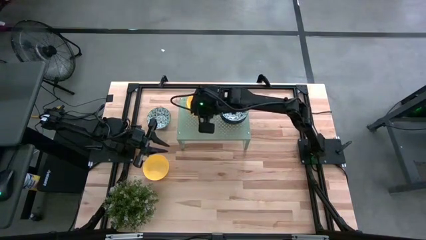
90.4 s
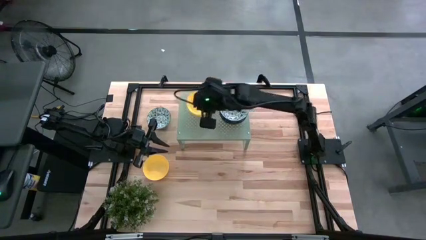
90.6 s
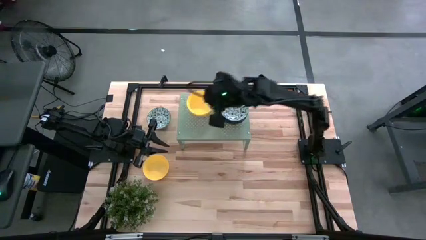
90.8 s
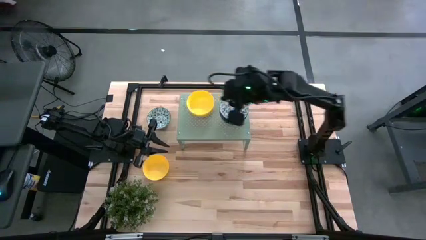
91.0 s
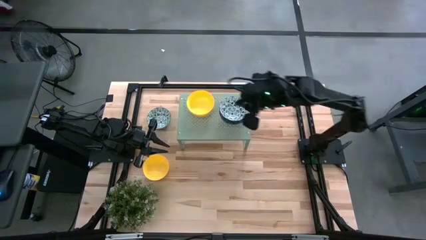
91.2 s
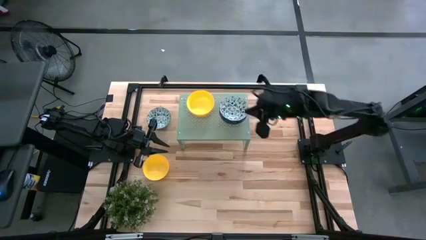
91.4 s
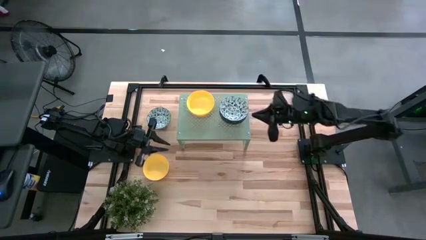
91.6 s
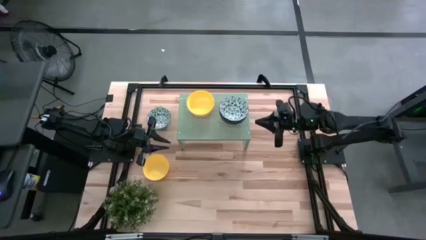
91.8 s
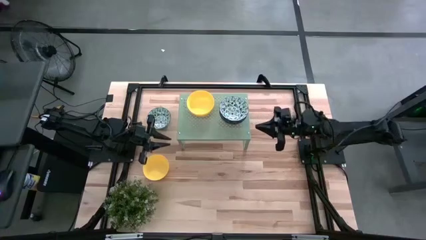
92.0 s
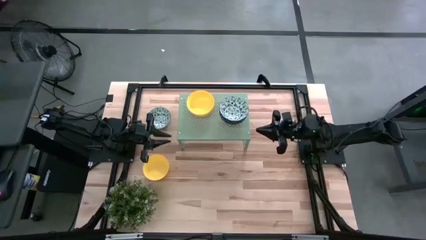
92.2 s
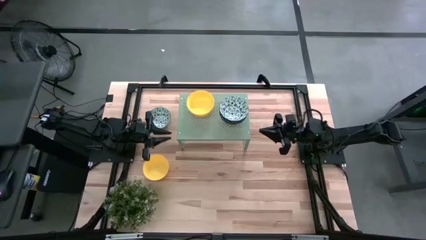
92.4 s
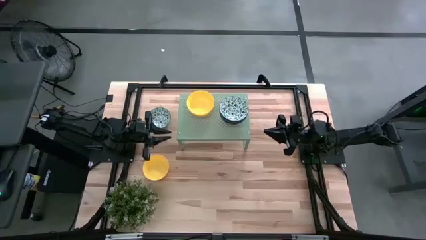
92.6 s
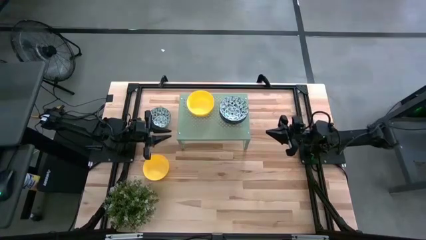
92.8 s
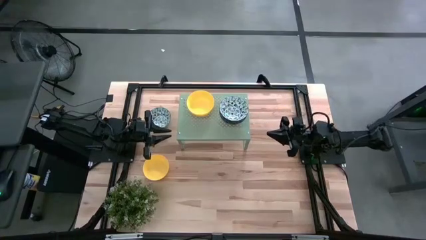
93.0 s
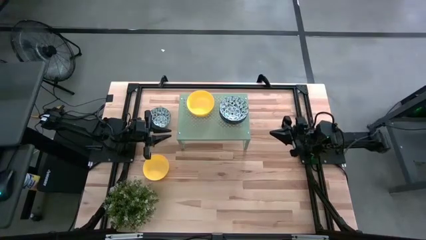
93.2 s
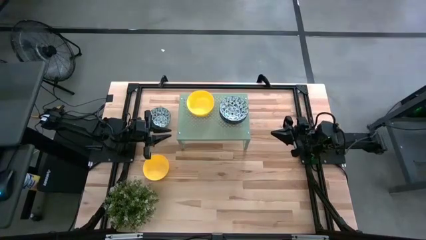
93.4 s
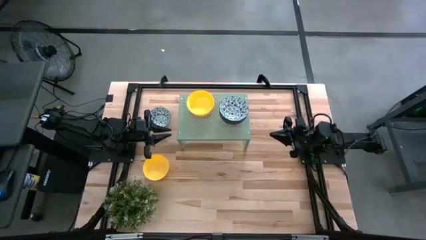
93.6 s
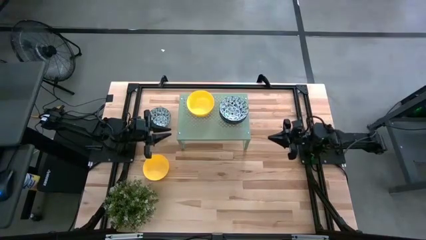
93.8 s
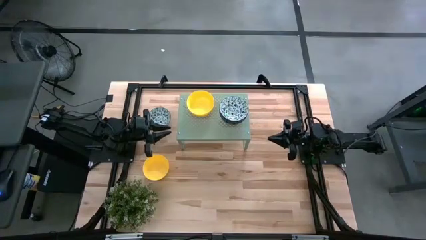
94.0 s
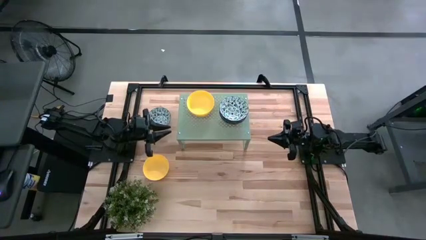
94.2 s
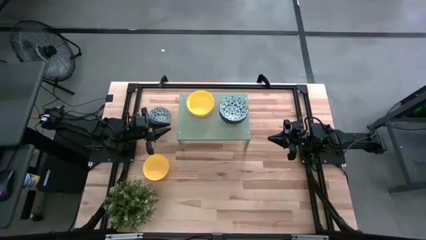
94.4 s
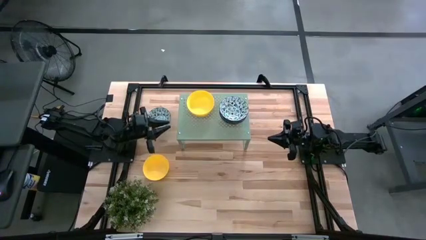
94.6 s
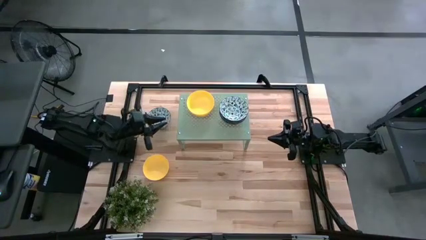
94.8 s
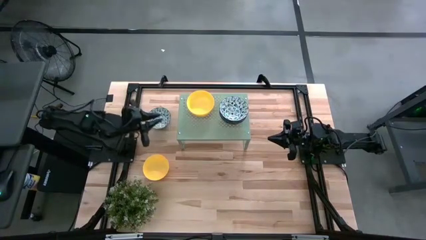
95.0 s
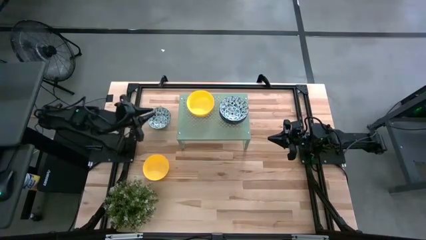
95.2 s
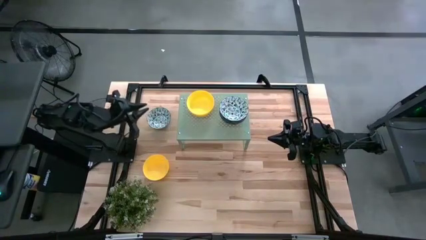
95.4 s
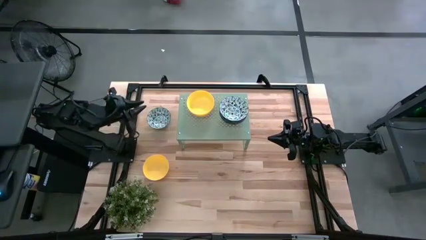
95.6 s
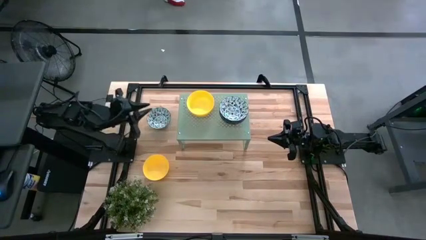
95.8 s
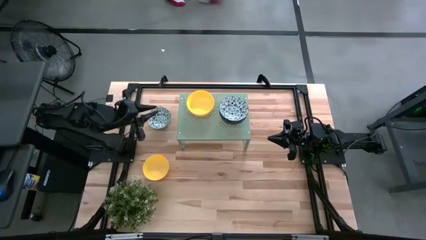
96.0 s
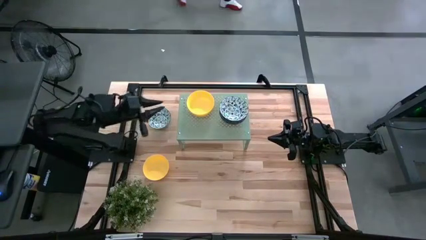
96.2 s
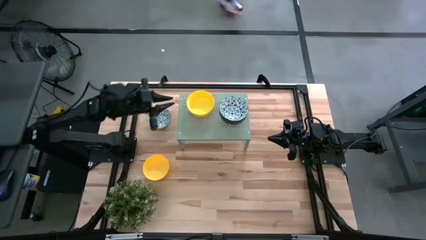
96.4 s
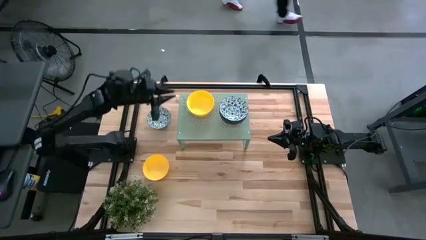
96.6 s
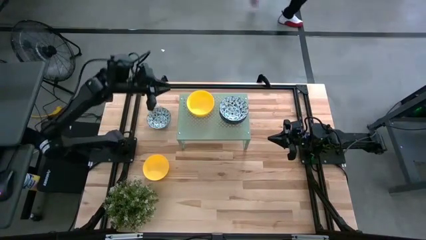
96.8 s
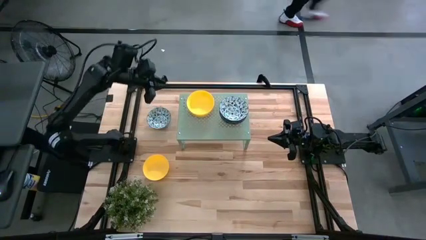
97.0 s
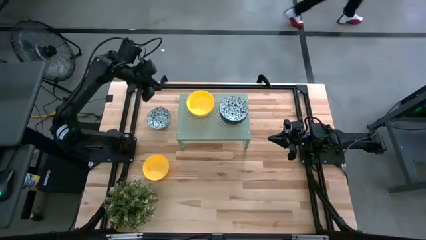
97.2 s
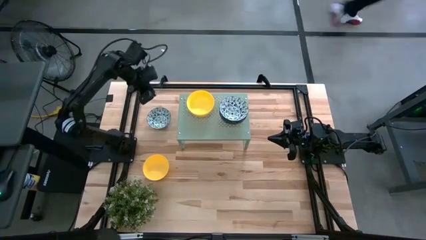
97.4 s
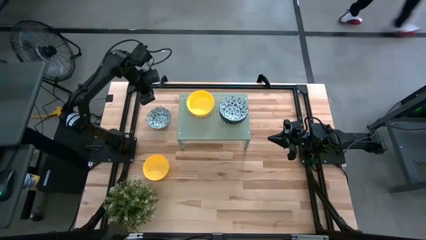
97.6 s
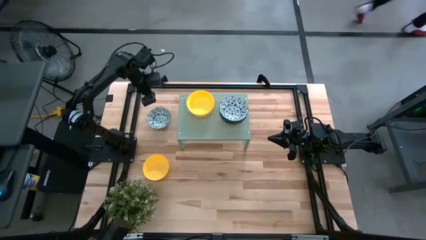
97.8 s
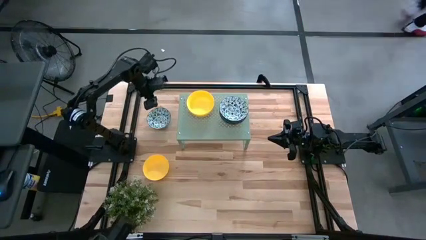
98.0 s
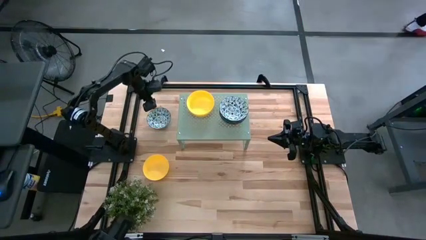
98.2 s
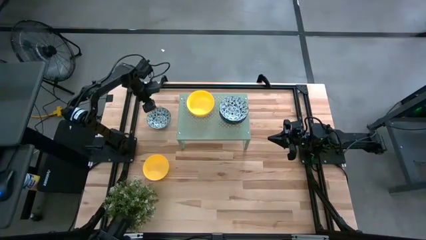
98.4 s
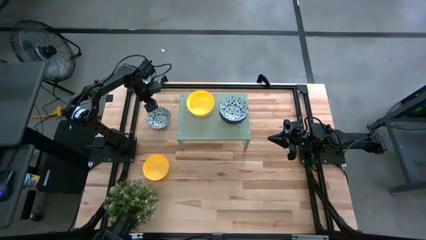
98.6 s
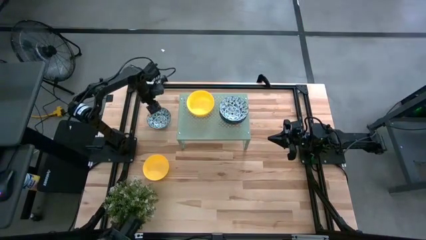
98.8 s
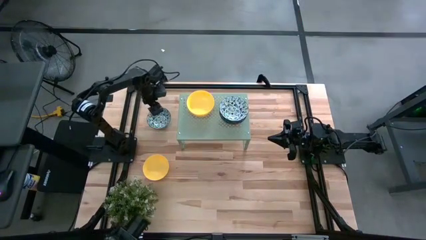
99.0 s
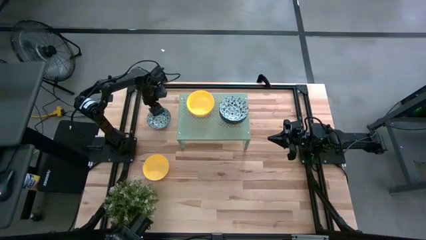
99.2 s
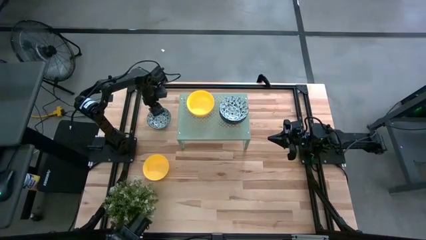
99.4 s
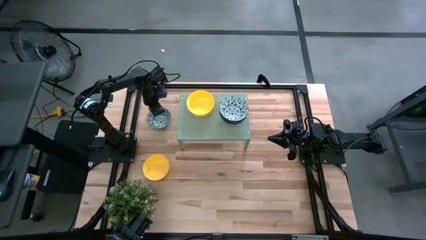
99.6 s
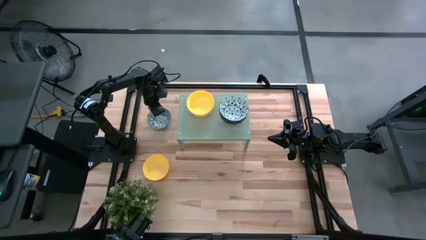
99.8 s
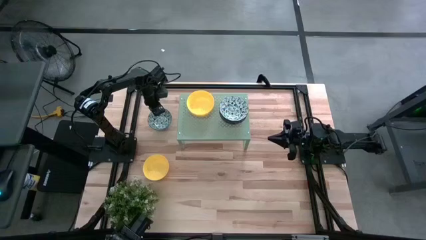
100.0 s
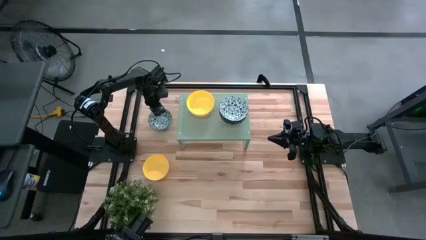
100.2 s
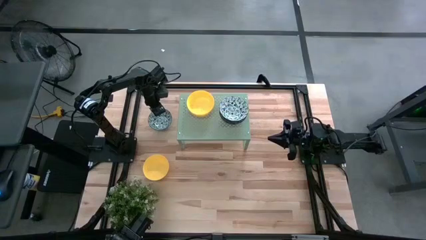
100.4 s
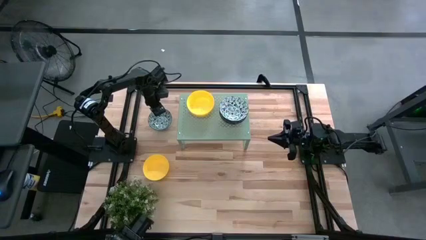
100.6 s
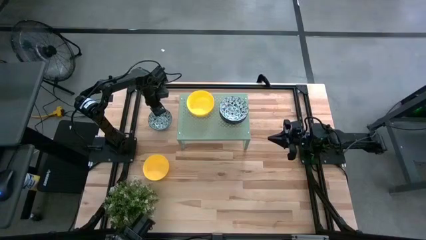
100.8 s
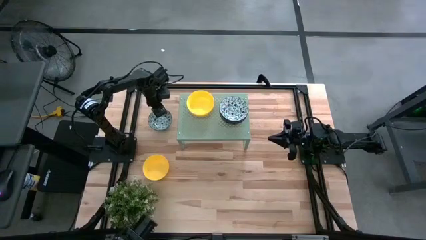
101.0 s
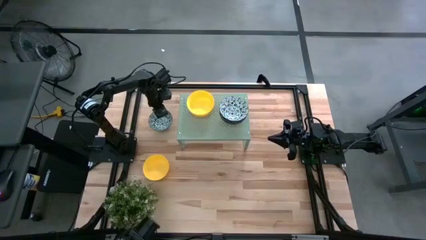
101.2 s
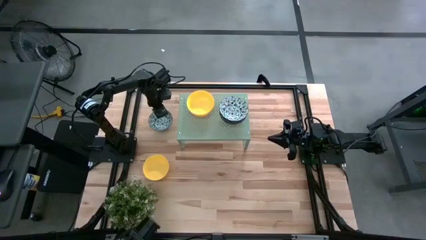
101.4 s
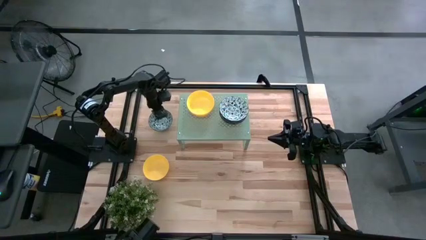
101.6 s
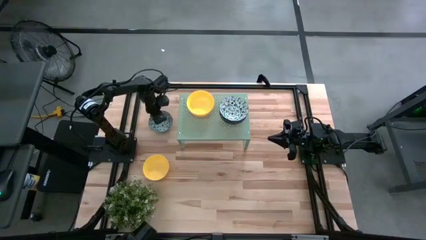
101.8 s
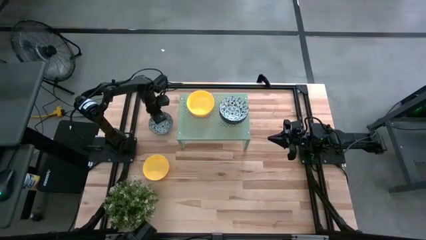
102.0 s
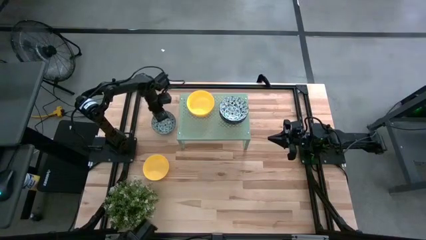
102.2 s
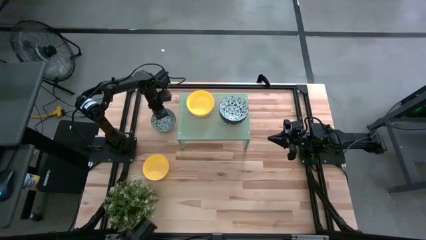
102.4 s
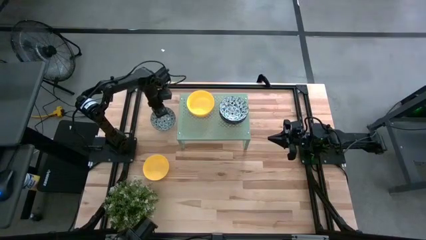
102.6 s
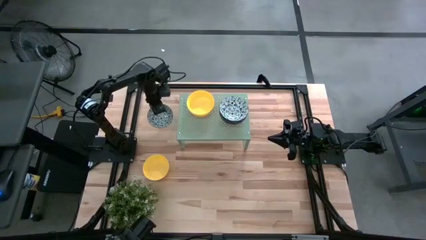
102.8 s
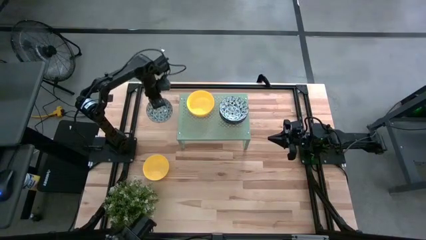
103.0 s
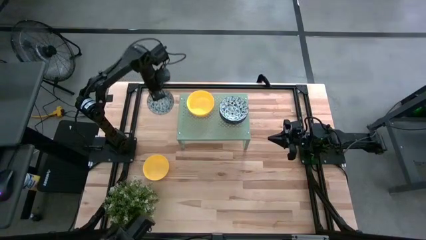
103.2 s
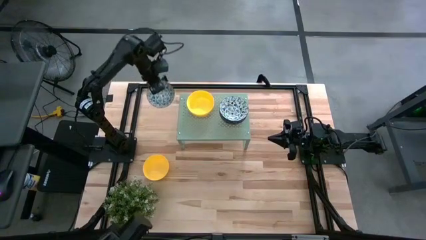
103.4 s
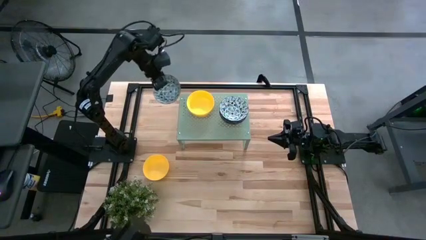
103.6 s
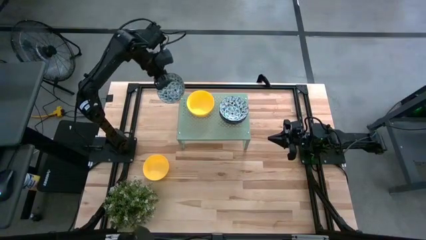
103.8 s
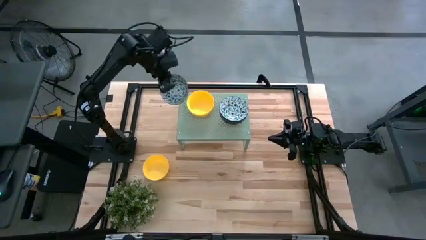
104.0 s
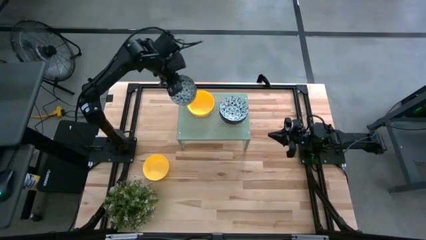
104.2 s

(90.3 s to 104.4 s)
Task: Pick & Place Mini bowls
Stack the blue bowl on top of the blue bowls on the shelf
